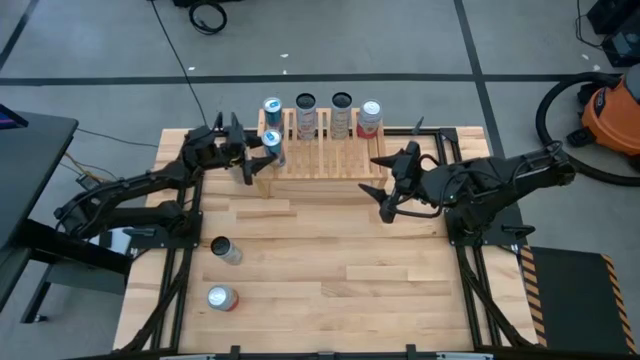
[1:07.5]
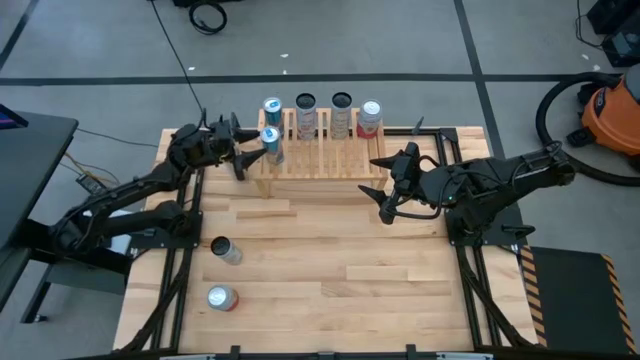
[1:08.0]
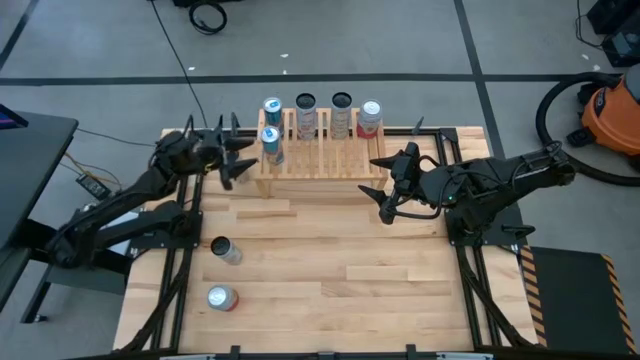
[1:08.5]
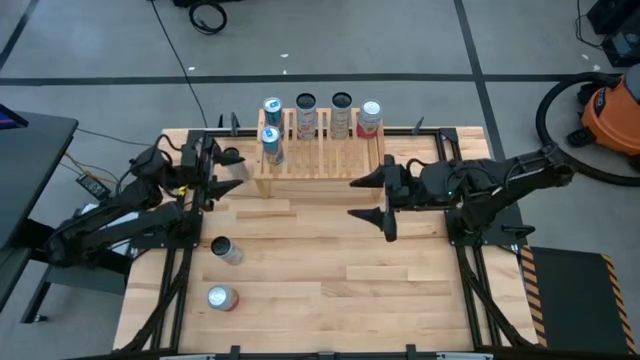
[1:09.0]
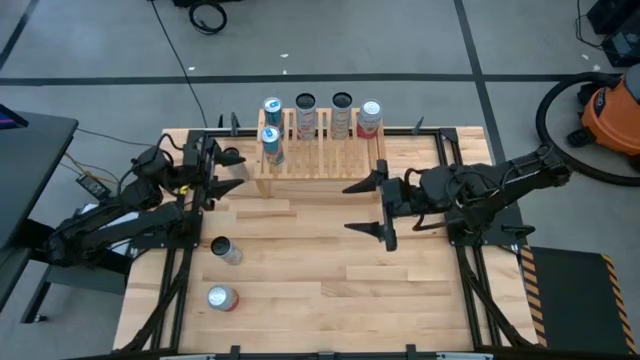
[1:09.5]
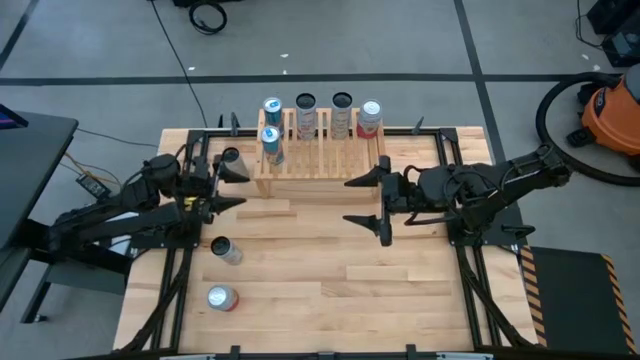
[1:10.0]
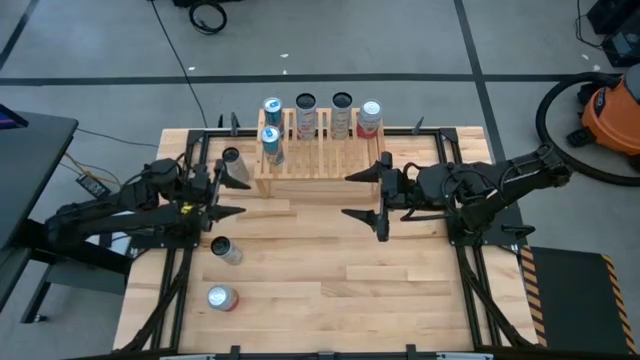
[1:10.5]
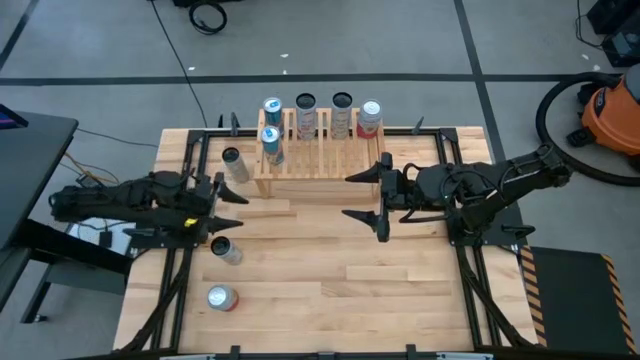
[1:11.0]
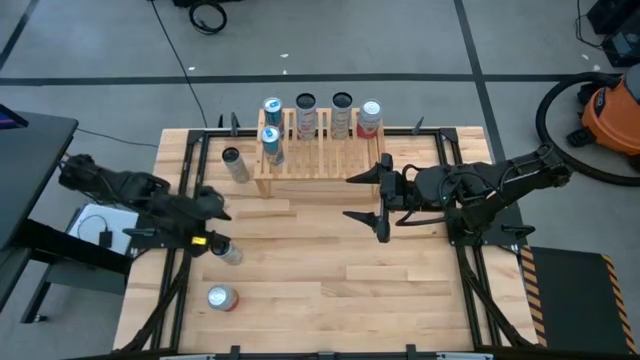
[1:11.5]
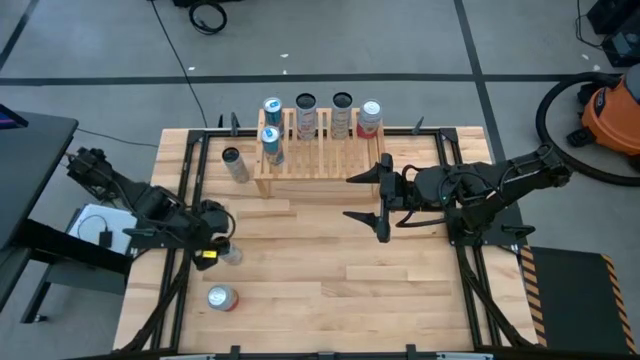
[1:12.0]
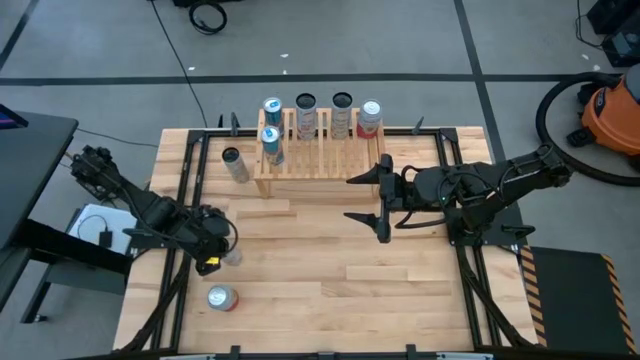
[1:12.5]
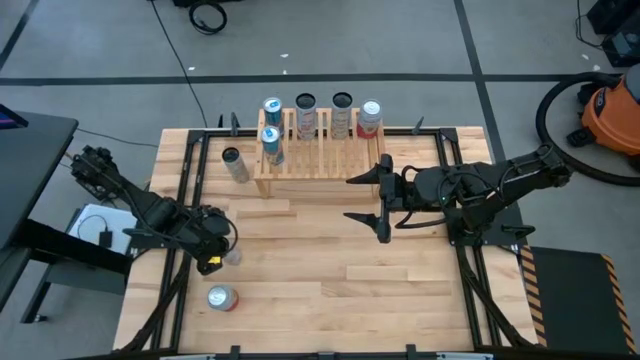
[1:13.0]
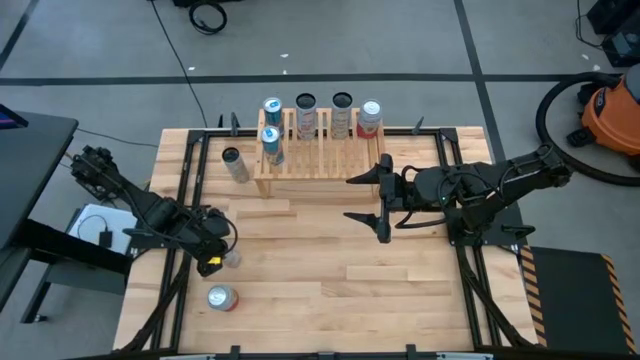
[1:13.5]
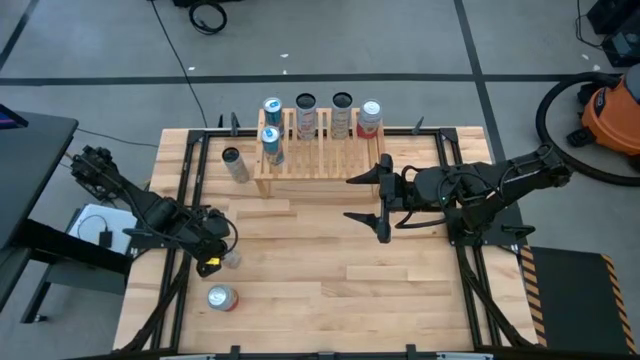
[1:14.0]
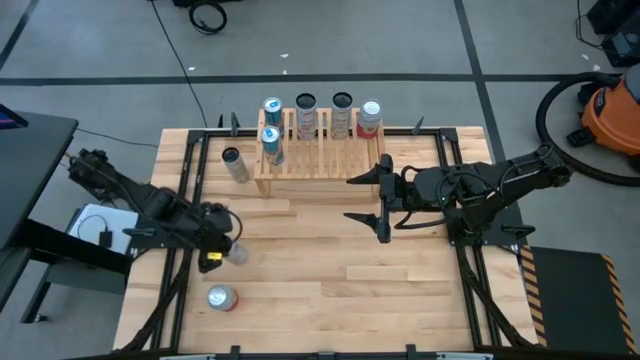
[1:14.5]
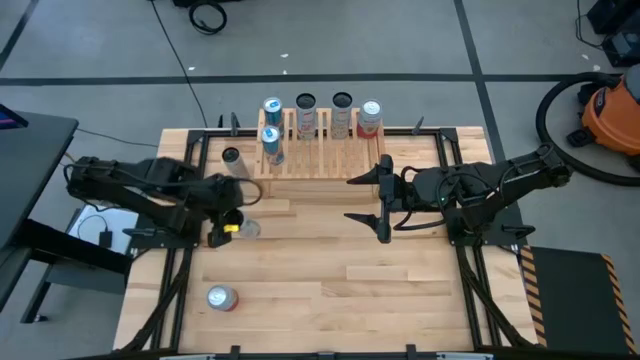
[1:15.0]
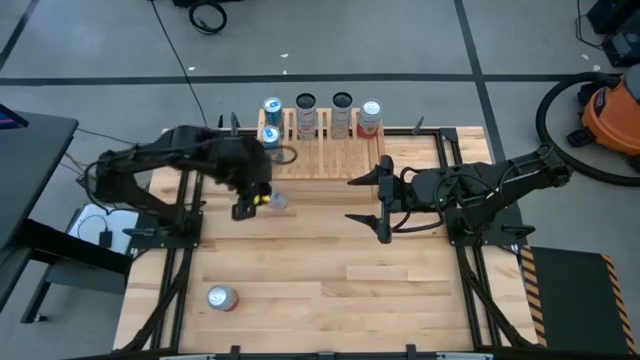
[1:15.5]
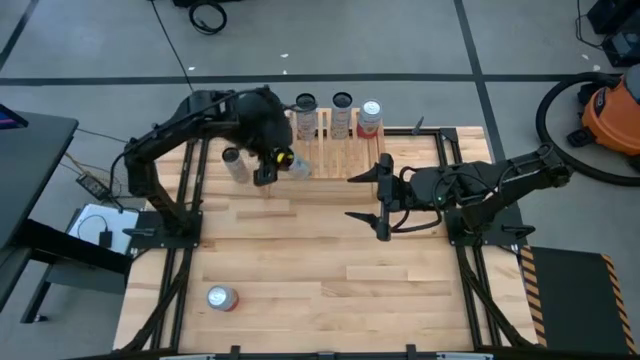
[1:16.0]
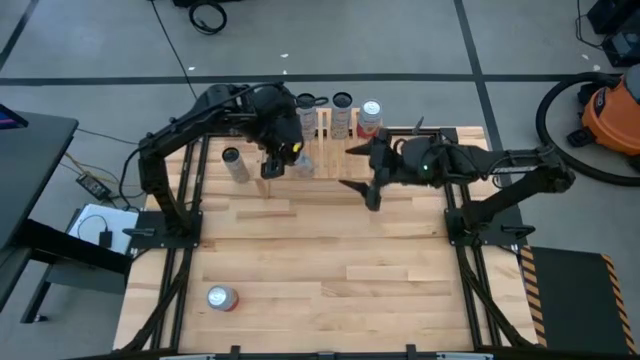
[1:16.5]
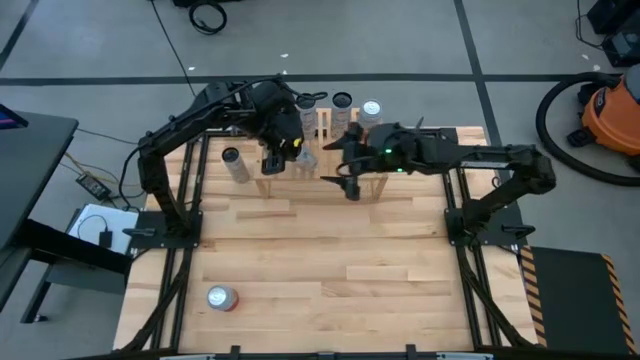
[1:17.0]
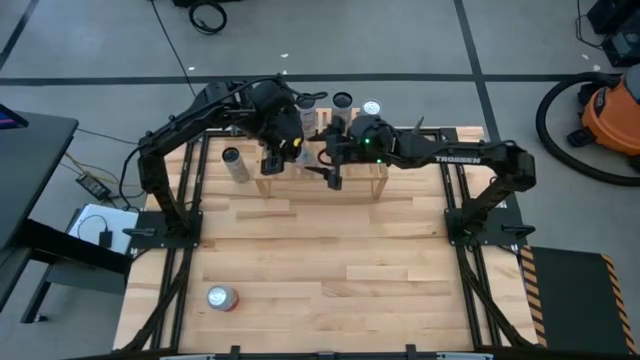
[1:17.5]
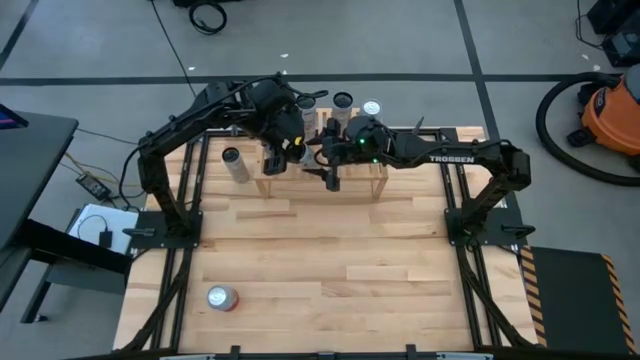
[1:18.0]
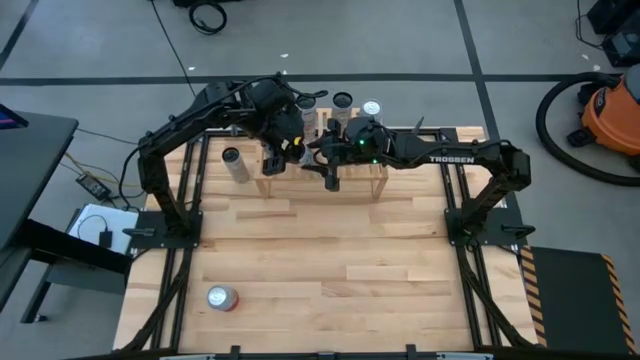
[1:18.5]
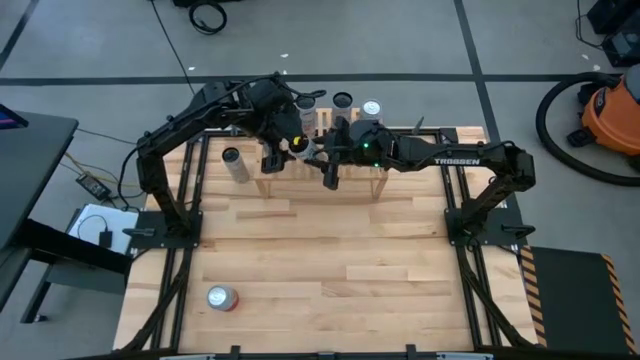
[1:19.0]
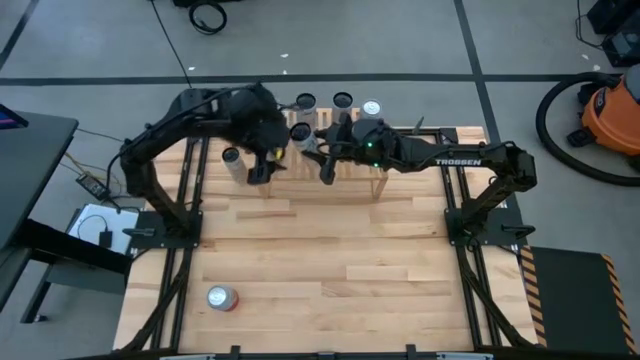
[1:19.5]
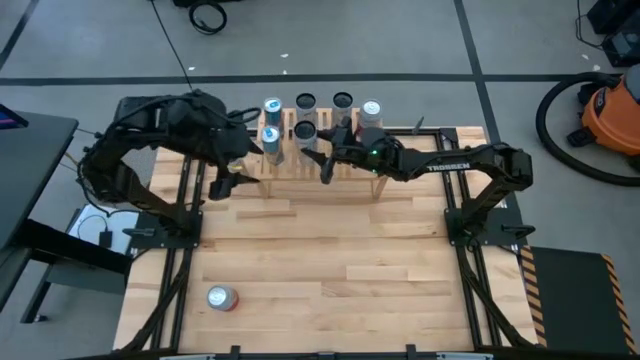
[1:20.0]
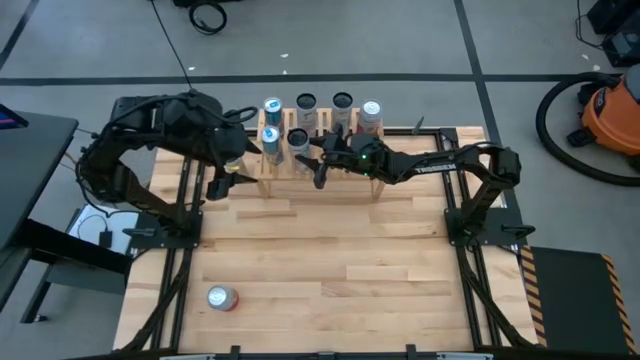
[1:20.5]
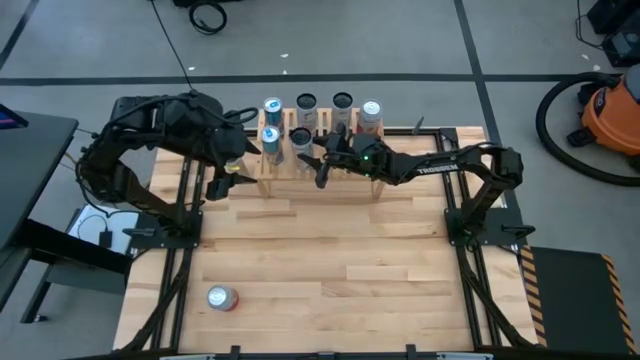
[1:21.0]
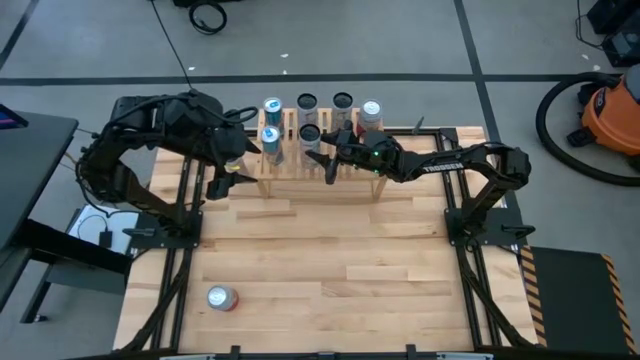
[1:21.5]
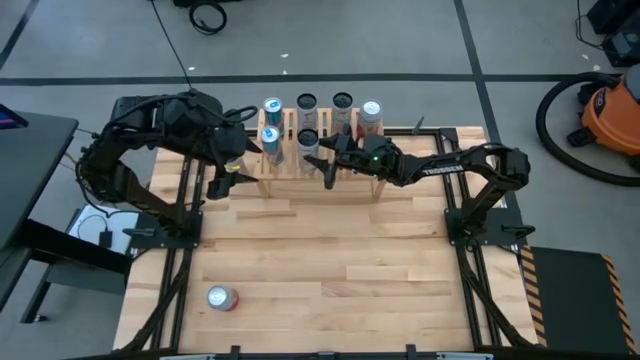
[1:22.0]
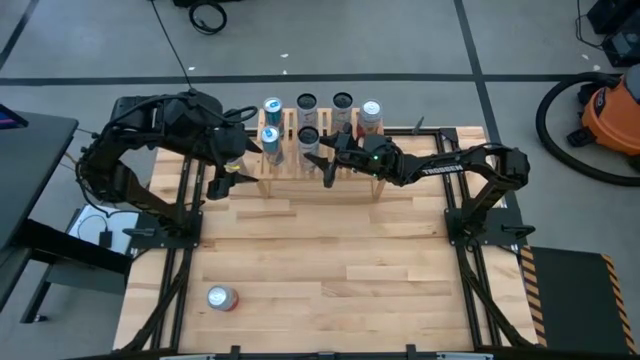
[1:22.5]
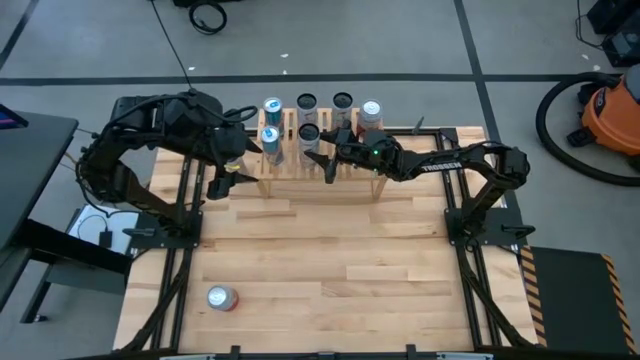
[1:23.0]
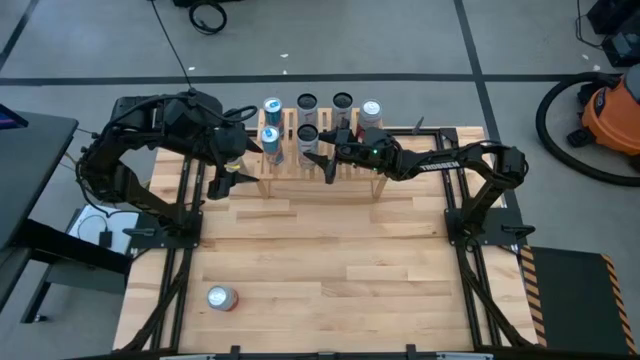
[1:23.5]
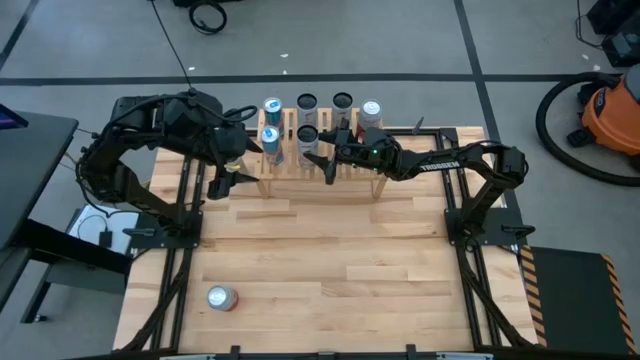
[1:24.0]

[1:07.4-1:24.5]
Task: Place canned beverage on shelf
Put the white pink soda can on the shelf aligned with the other white pink soda can

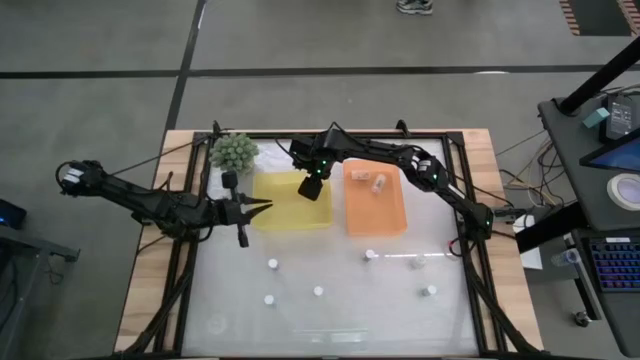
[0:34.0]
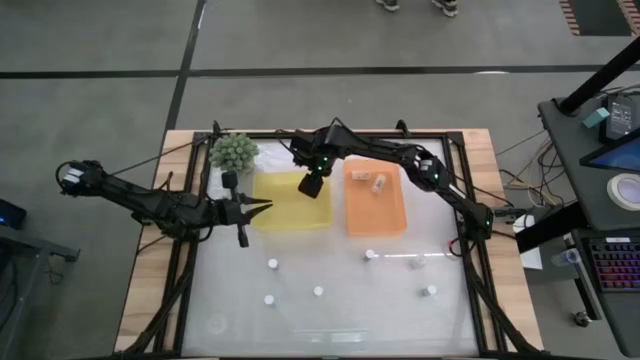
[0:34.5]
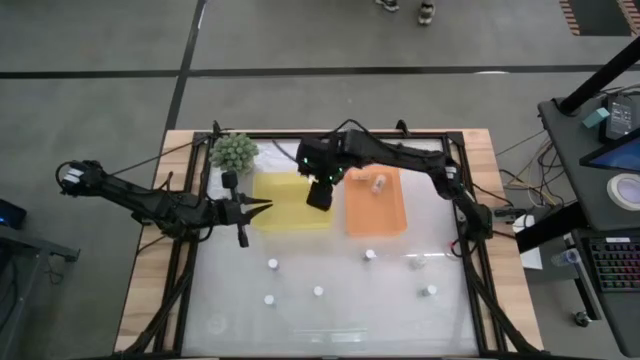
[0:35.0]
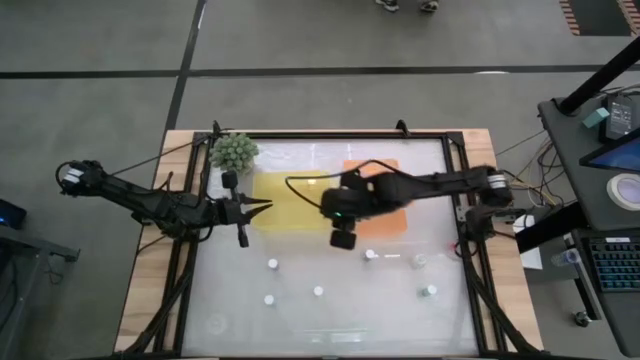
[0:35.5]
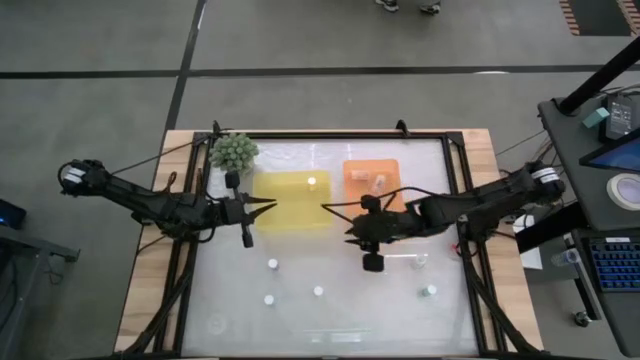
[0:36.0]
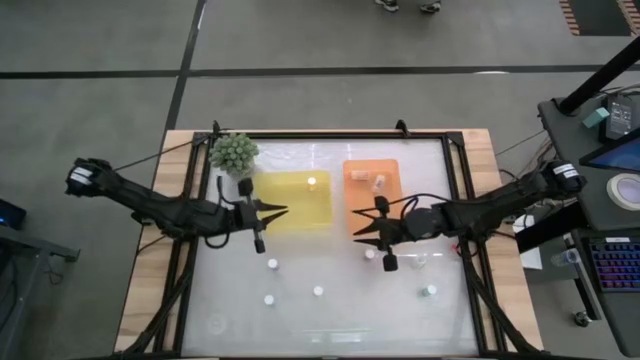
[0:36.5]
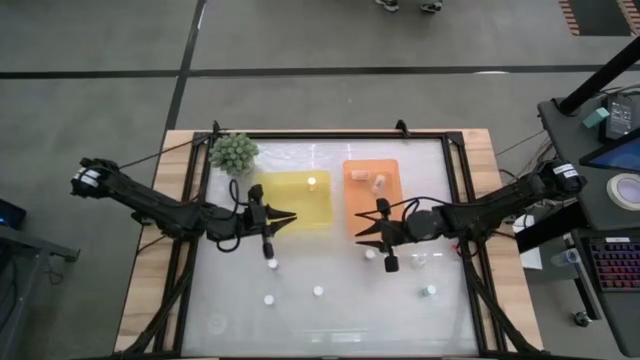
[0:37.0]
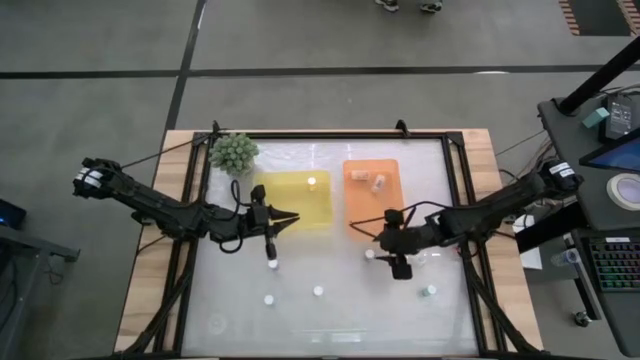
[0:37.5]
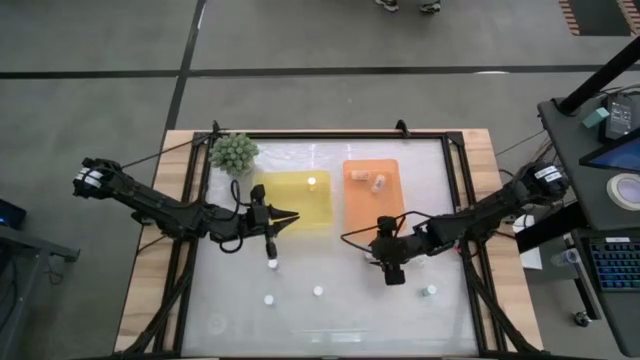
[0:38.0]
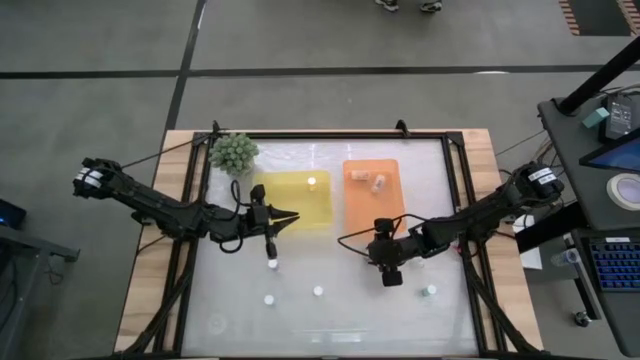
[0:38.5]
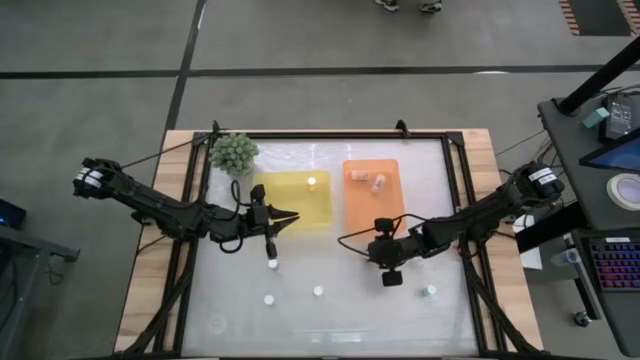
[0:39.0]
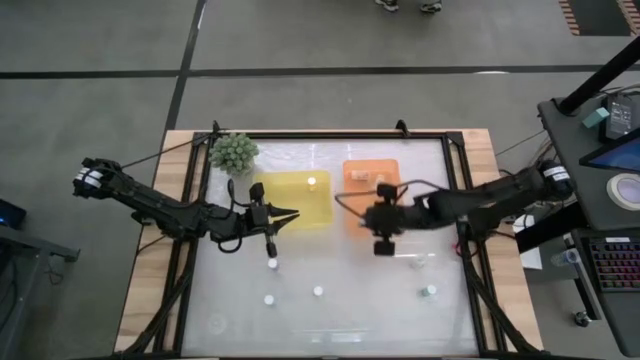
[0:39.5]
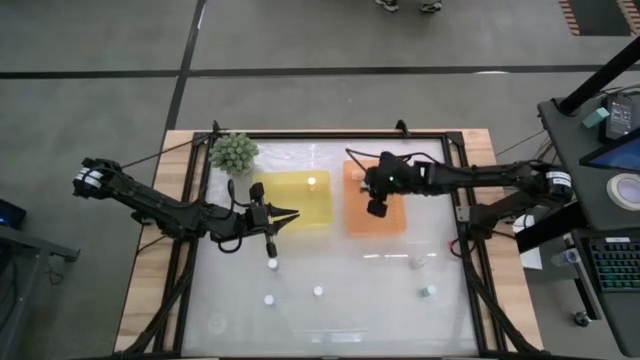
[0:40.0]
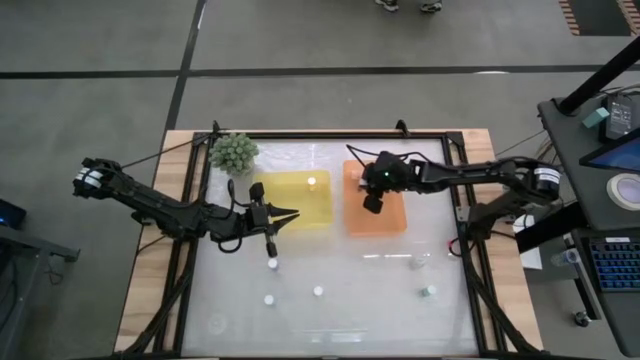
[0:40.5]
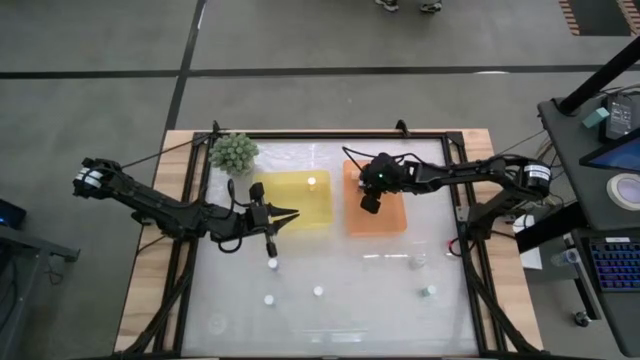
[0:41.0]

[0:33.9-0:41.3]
Task: Pick and place medicine bottles into bin by pill shape (circle, oval)
Put the right blue pill bottle into the orange bin
